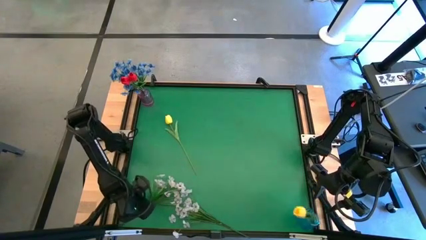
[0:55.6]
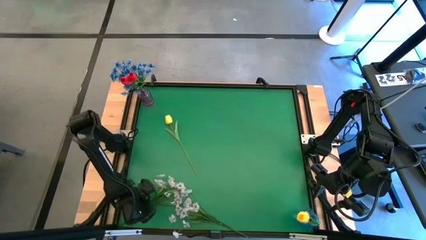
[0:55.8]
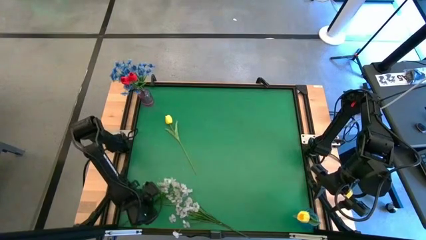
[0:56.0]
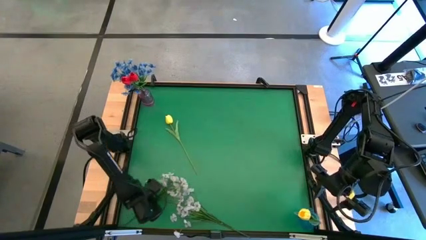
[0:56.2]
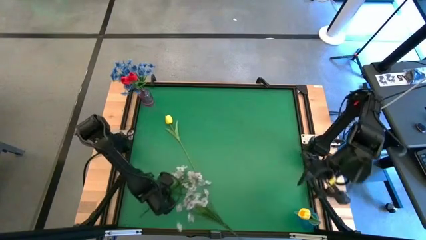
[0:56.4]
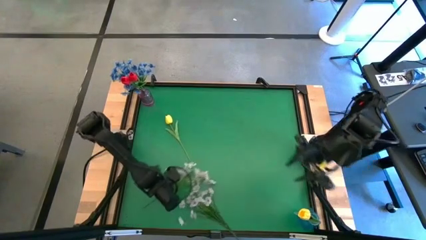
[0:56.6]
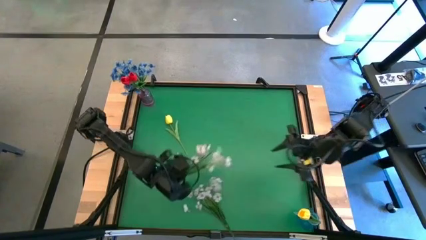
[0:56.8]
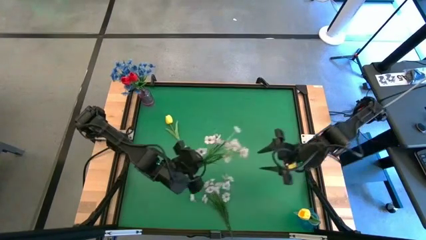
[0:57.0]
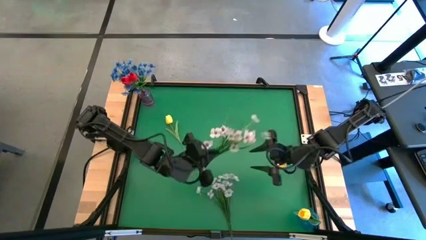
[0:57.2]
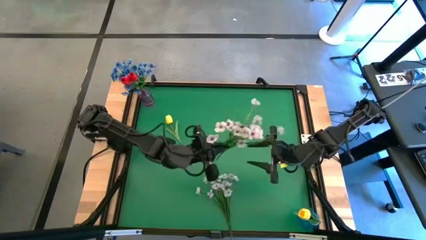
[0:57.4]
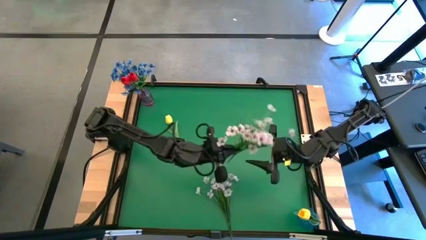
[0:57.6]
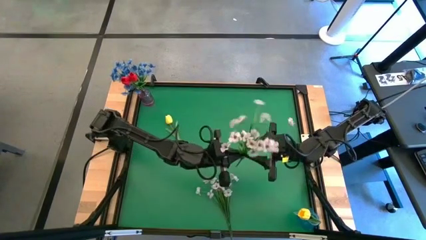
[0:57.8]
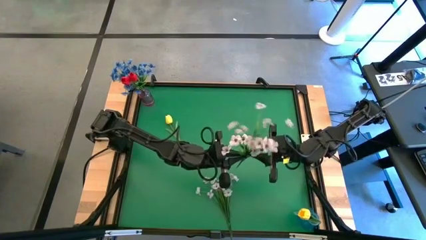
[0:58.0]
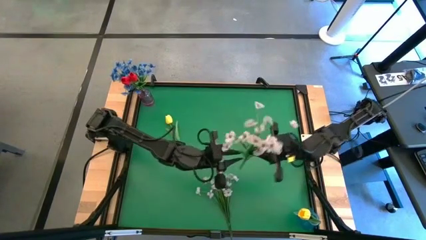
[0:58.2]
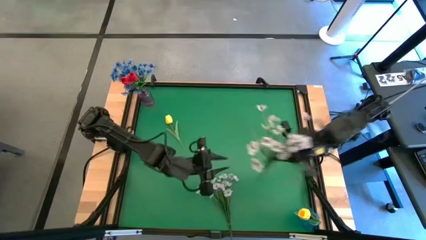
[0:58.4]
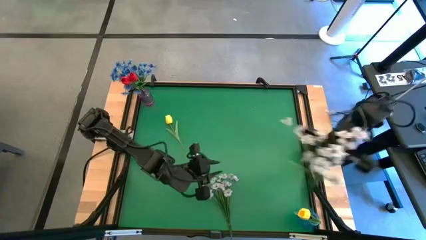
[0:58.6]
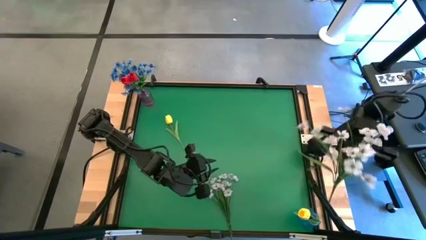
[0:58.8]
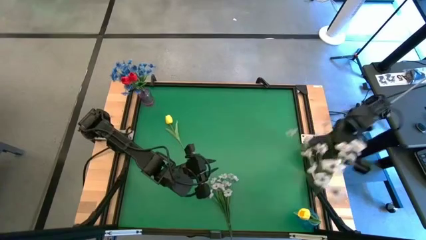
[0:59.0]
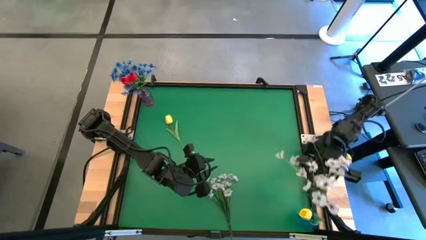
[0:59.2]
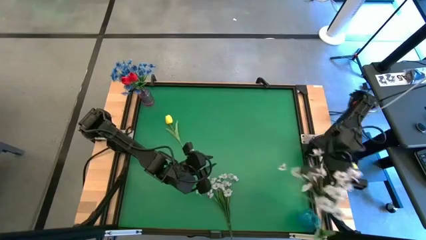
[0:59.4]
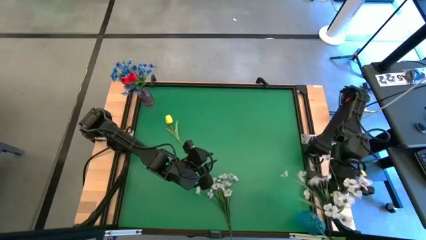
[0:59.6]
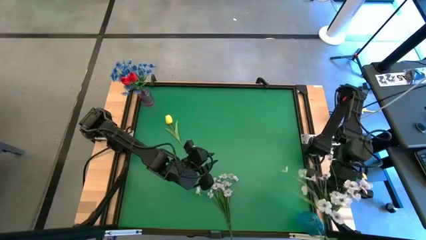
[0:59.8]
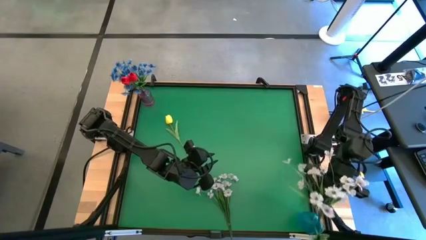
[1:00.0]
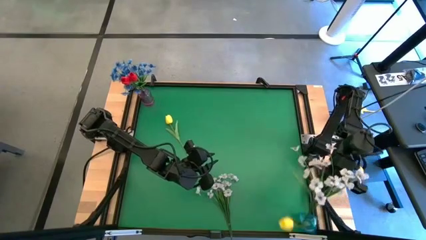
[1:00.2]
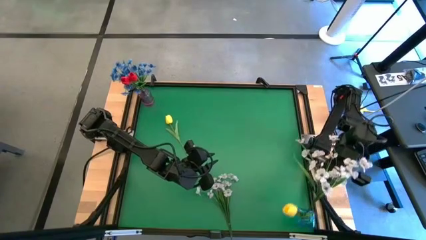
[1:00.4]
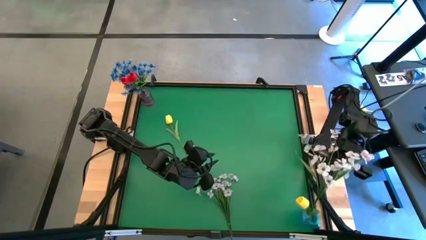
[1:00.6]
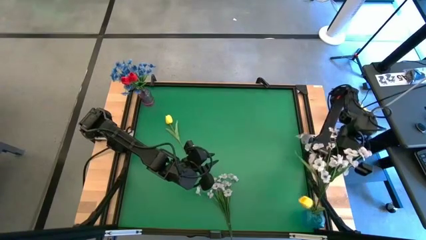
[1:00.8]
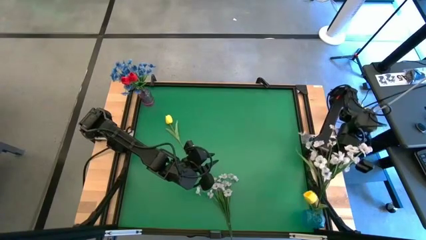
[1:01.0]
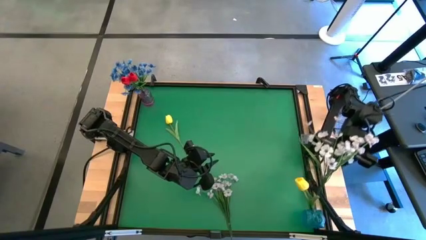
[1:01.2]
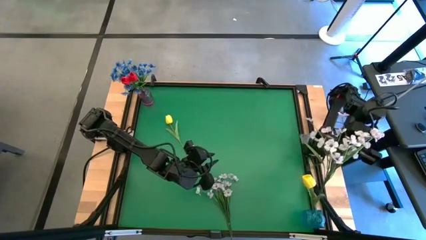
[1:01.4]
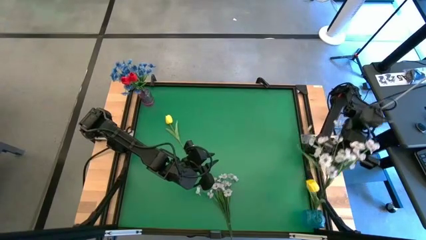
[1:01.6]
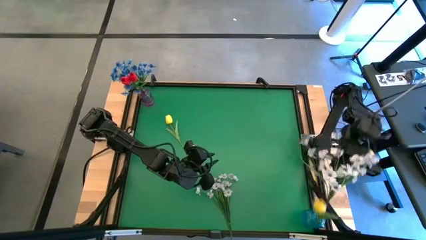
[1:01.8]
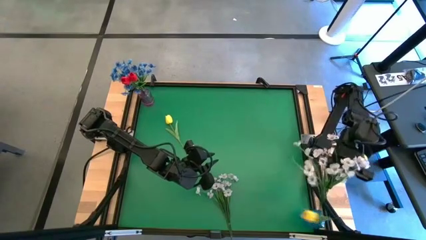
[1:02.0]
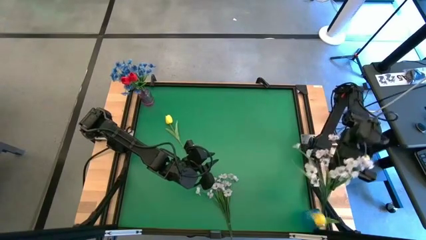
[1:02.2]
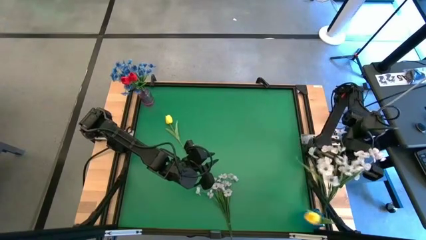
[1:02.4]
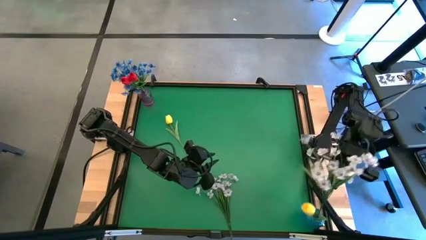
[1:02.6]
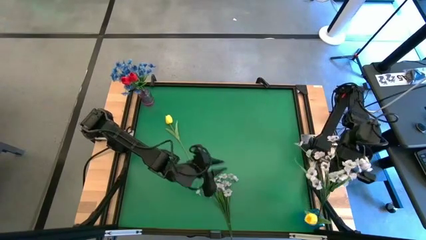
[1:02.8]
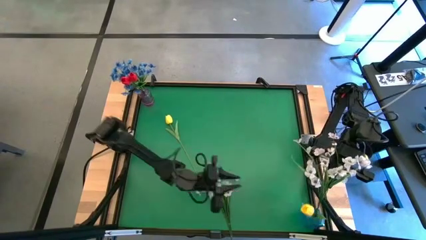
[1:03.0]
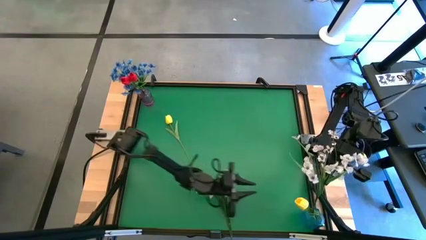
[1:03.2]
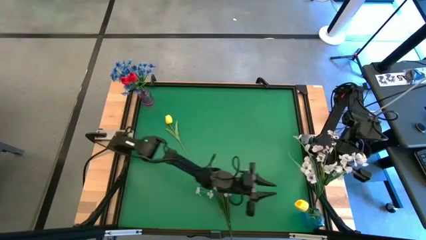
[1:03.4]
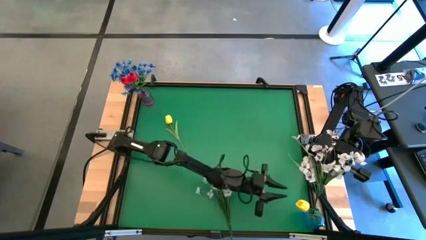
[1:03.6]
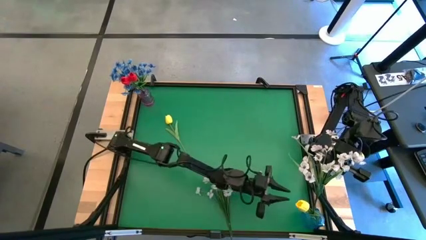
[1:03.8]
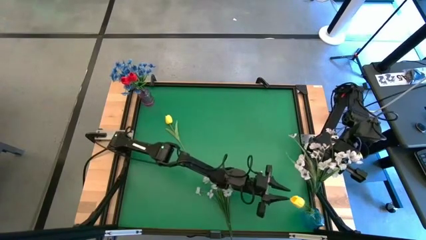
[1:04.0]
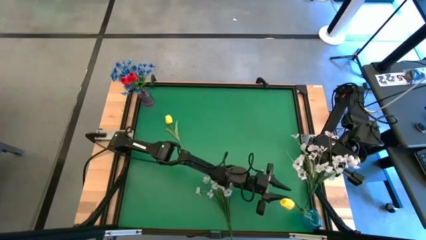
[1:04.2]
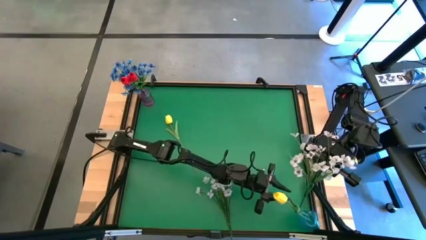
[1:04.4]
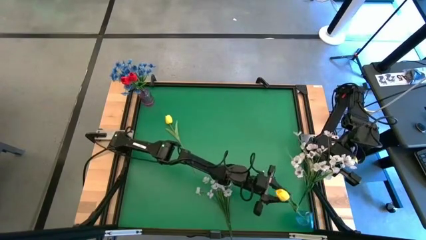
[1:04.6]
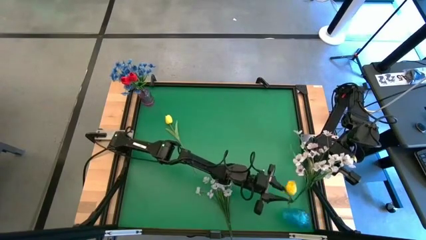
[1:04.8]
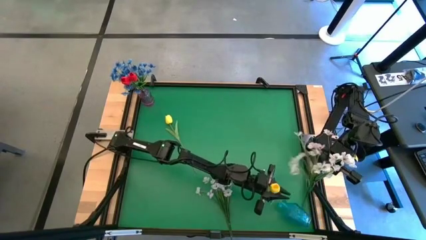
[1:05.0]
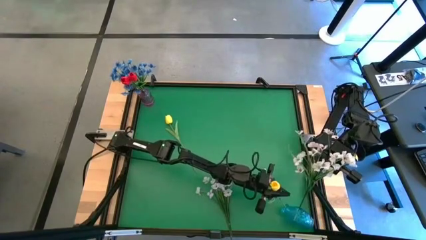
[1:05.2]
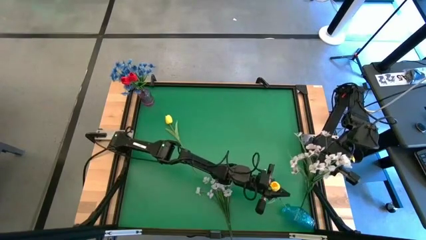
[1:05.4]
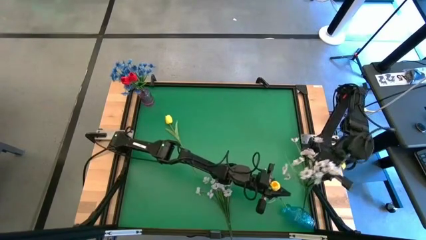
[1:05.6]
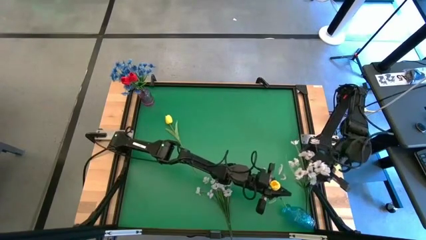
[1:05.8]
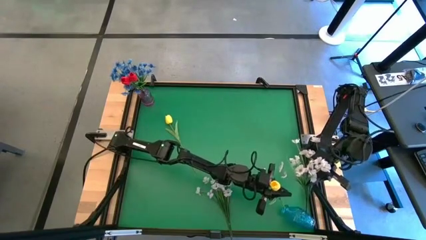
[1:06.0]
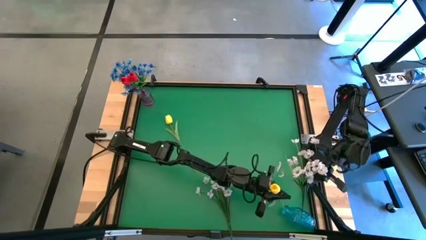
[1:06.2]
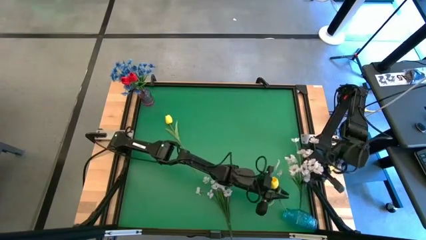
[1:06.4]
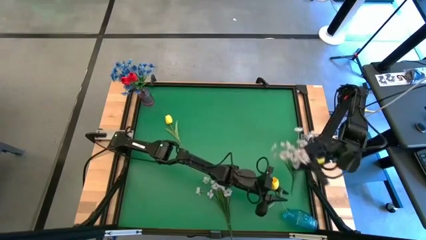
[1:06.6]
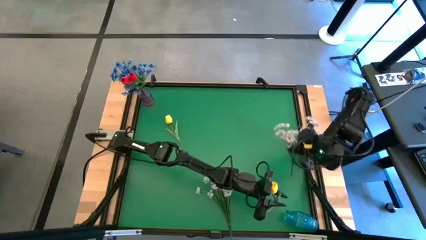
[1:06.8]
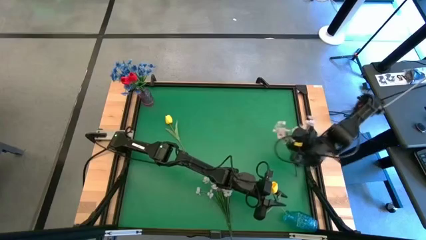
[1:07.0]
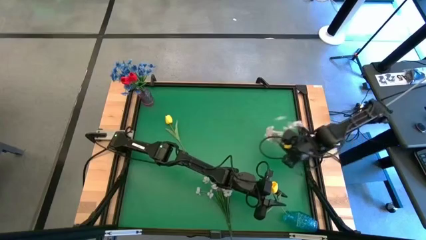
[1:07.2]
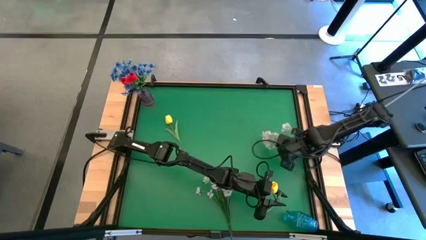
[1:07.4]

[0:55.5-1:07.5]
Task: Sort flowers into vase by color
Put the left white flowers into the blue vase

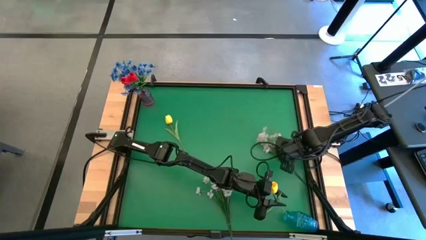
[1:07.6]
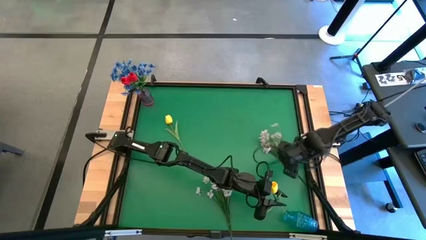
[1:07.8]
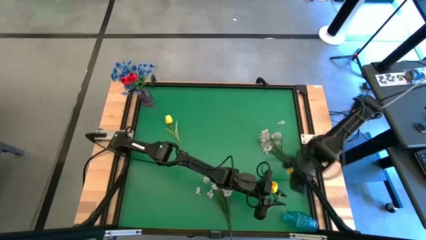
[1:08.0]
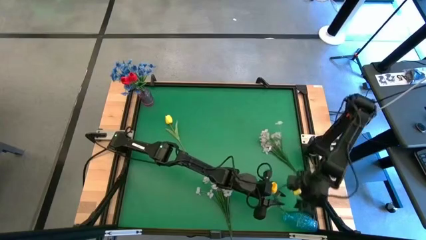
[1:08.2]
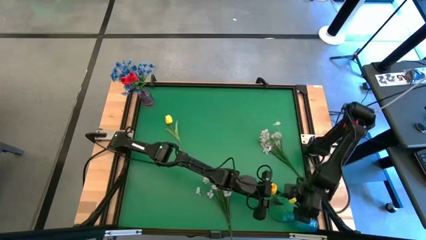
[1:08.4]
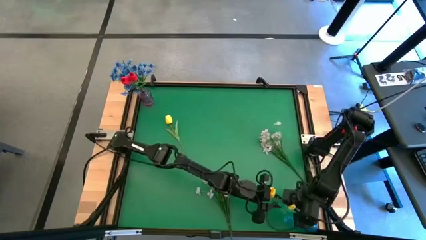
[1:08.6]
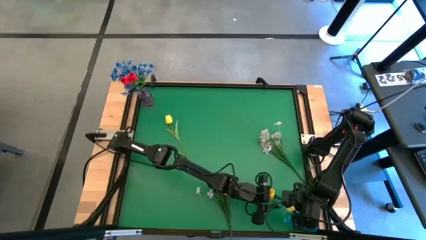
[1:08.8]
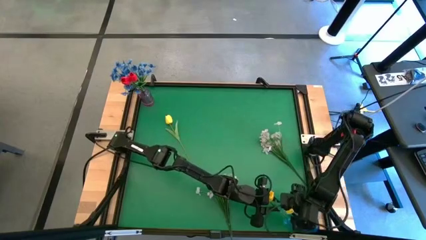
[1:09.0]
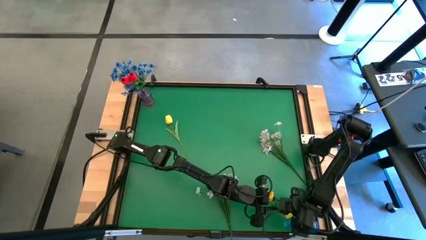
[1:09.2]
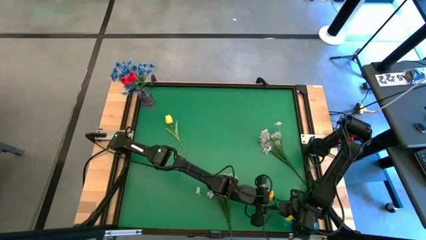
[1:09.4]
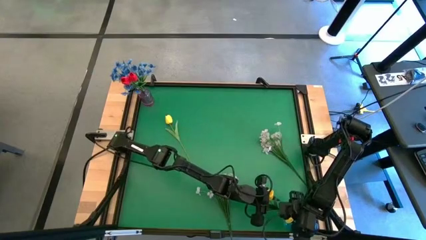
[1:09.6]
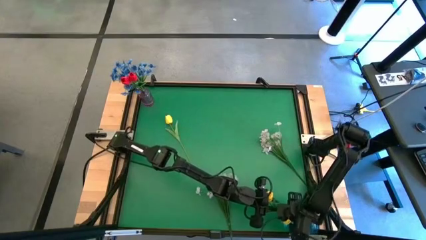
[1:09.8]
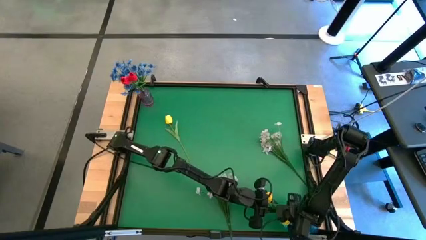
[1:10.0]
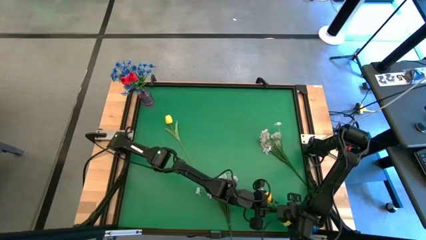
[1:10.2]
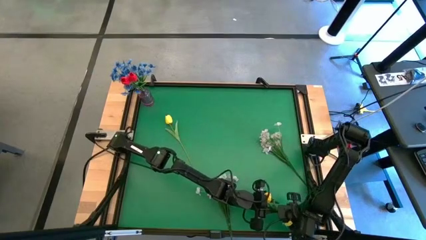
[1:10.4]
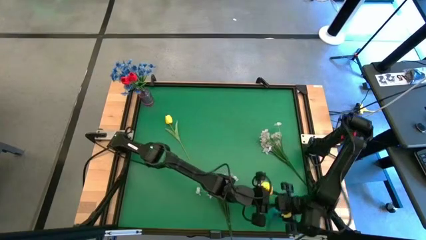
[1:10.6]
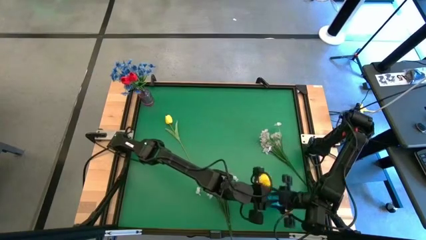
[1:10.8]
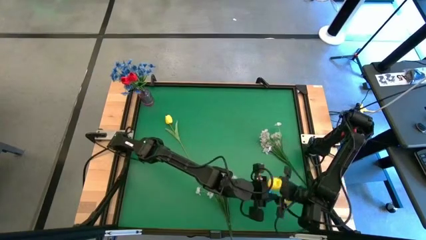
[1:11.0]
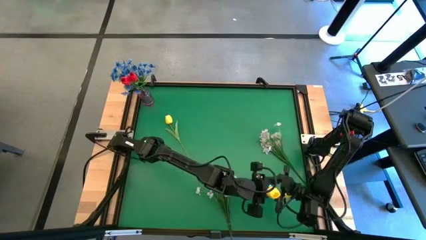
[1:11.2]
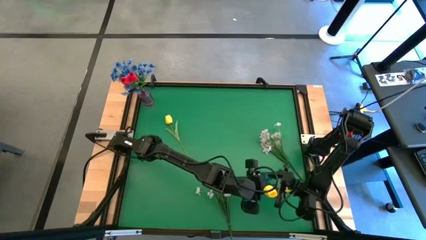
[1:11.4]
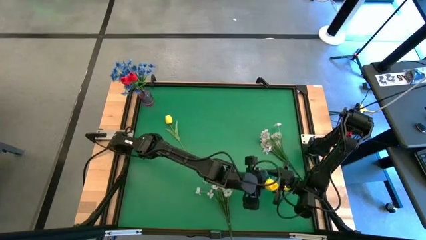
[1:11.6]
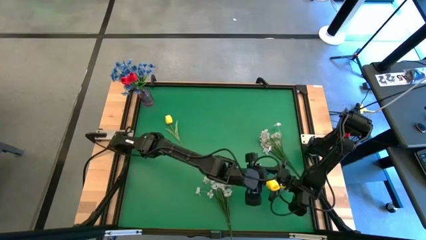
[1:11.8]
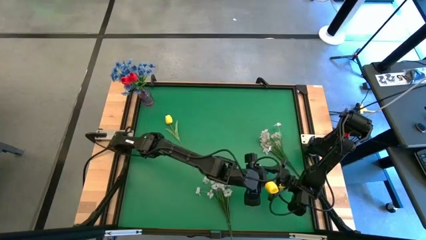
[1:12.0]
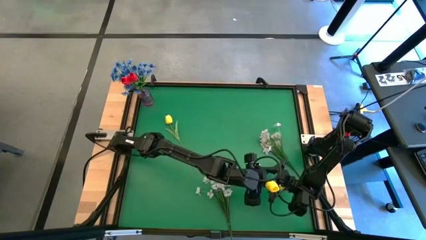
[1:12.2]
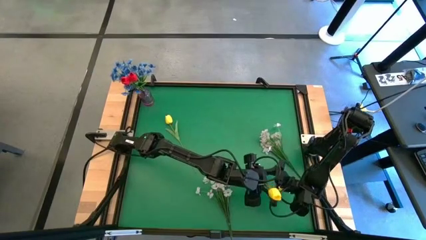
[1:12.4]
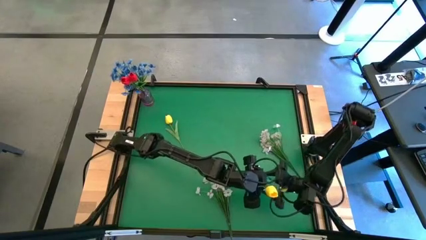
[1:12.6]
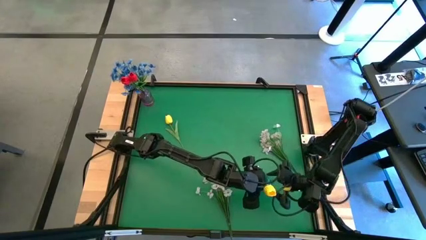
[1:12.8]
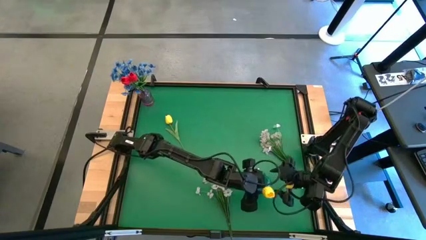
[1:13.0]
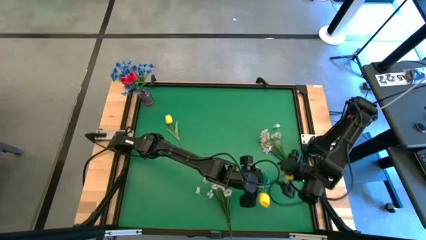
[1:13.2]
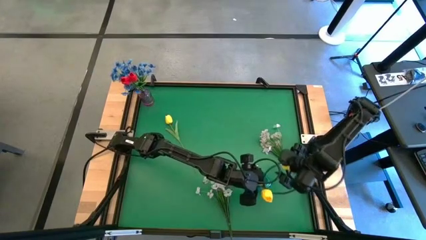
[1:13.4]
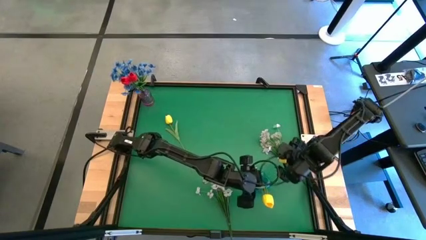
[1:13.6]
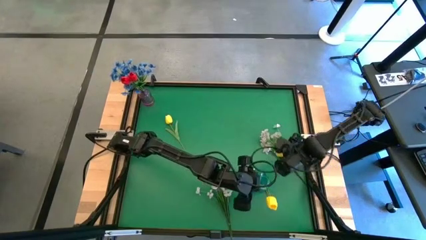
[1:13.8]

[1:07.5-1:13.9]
Adjust the blue flower vase
